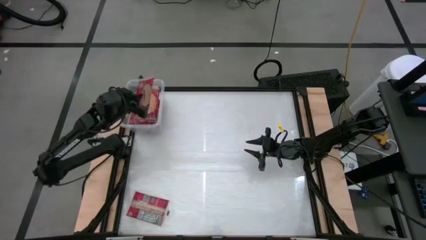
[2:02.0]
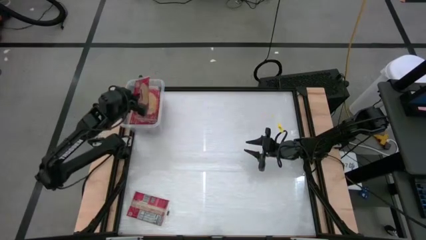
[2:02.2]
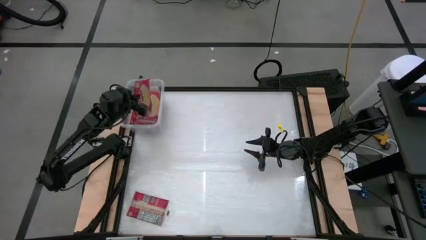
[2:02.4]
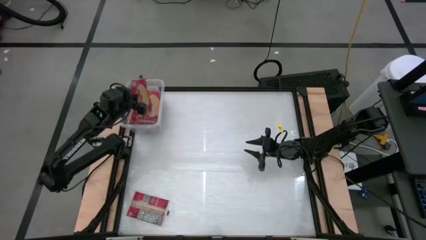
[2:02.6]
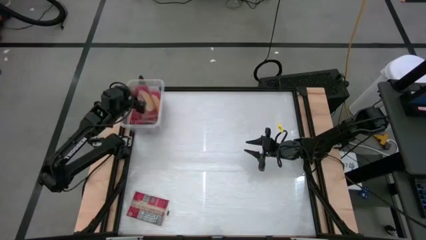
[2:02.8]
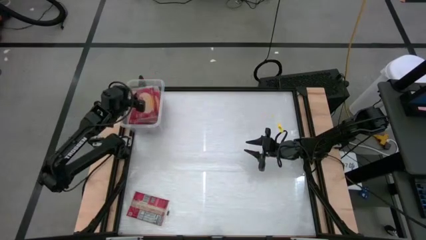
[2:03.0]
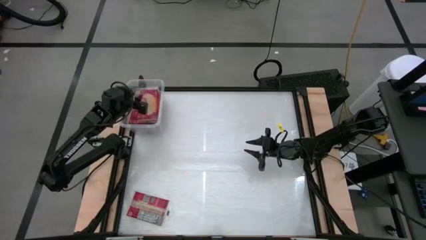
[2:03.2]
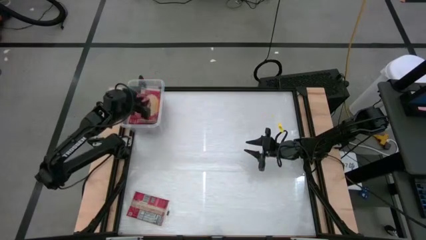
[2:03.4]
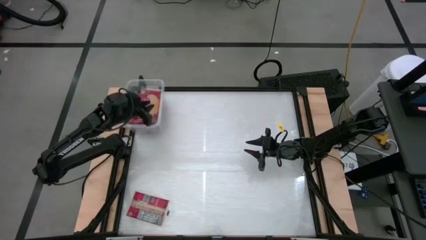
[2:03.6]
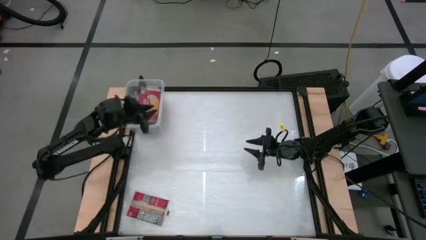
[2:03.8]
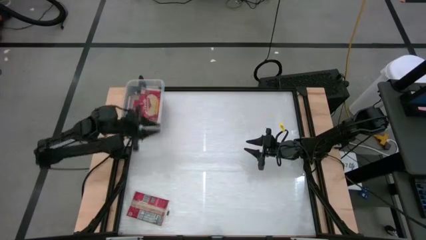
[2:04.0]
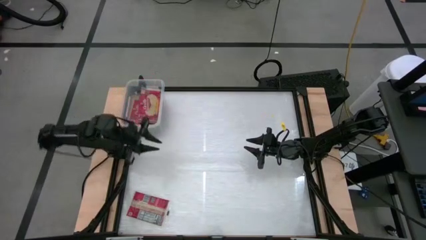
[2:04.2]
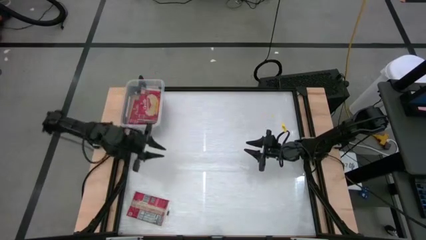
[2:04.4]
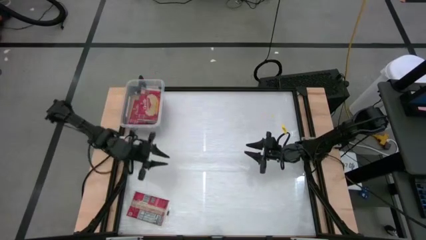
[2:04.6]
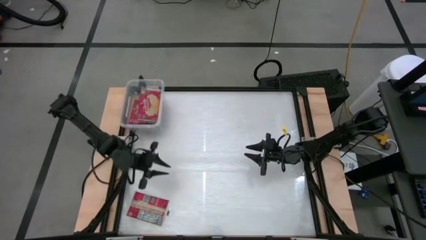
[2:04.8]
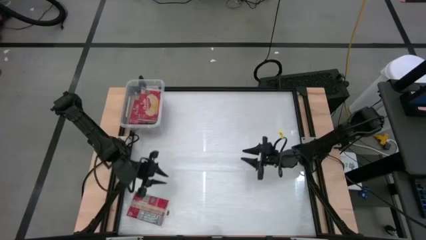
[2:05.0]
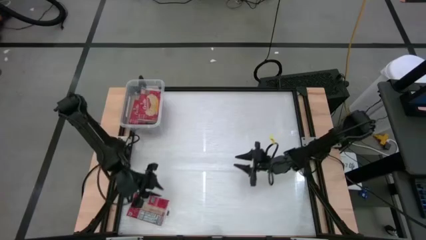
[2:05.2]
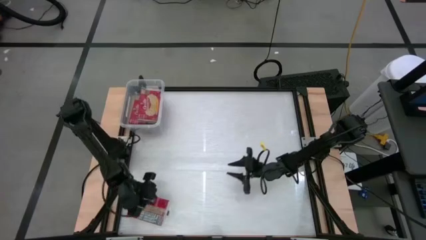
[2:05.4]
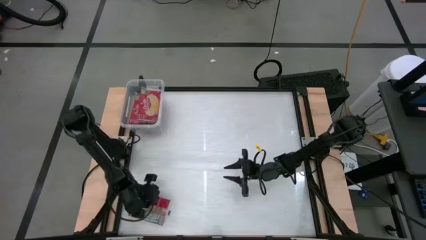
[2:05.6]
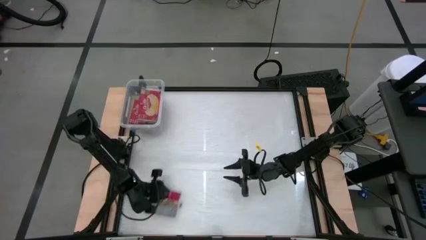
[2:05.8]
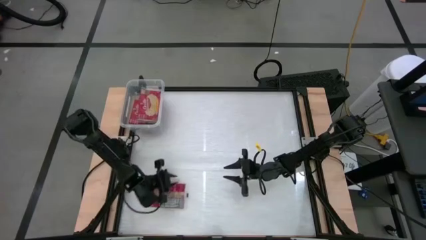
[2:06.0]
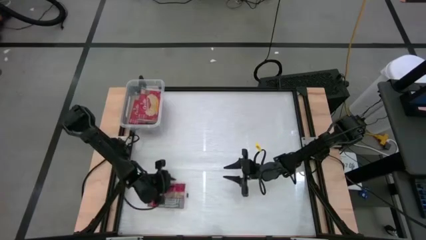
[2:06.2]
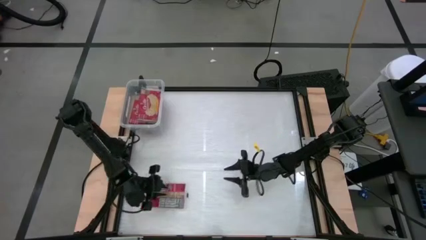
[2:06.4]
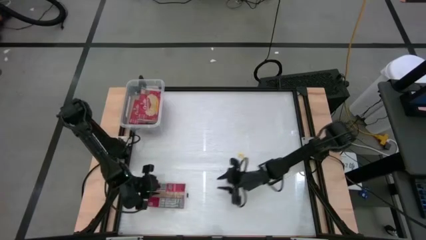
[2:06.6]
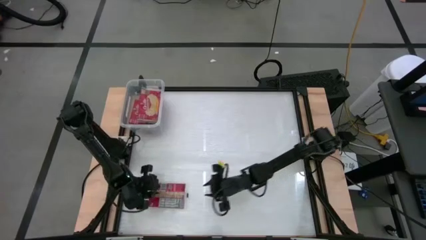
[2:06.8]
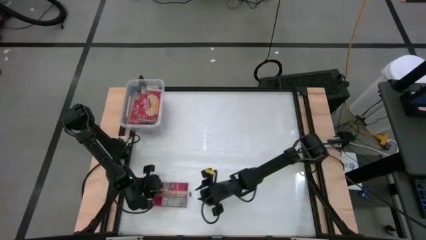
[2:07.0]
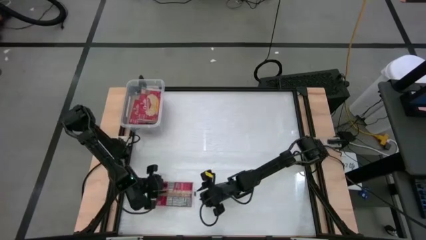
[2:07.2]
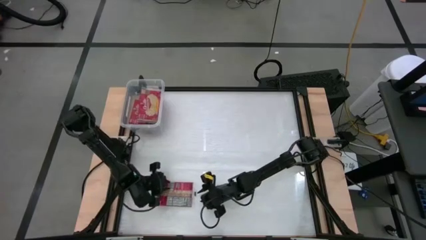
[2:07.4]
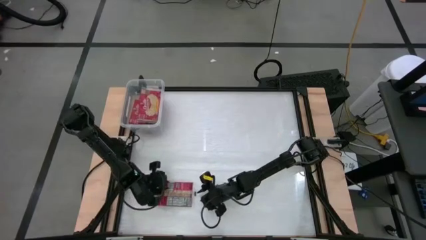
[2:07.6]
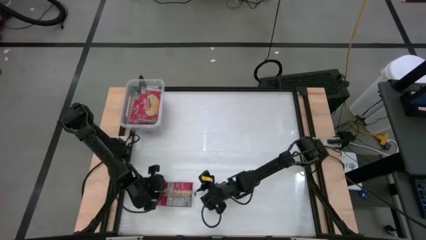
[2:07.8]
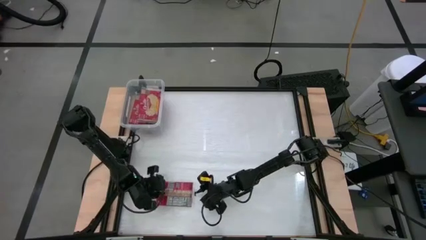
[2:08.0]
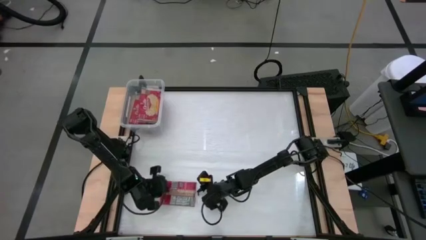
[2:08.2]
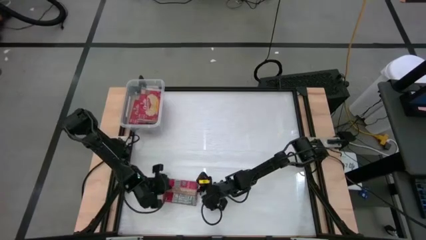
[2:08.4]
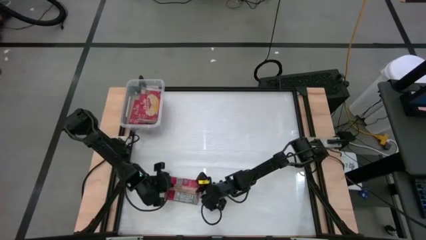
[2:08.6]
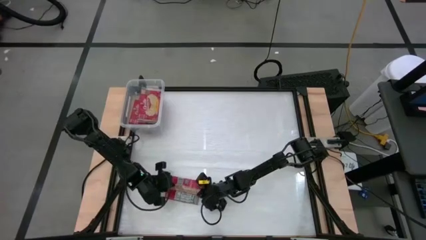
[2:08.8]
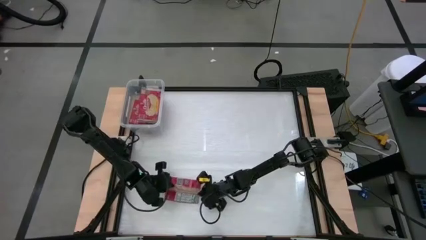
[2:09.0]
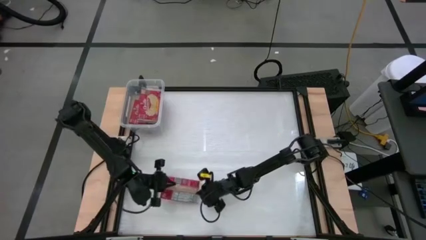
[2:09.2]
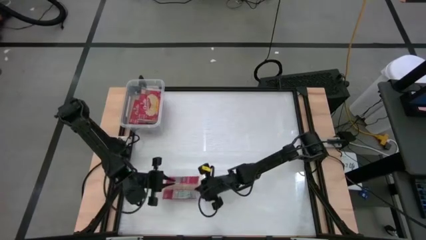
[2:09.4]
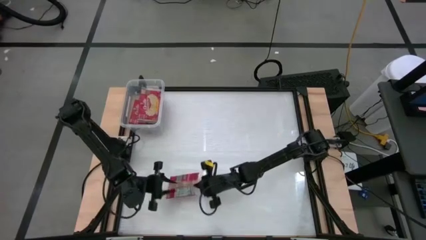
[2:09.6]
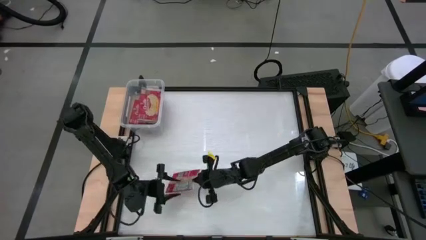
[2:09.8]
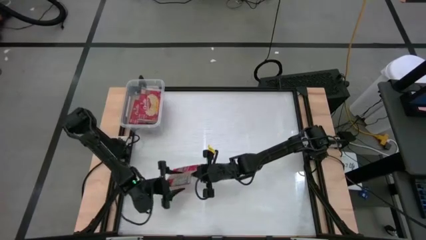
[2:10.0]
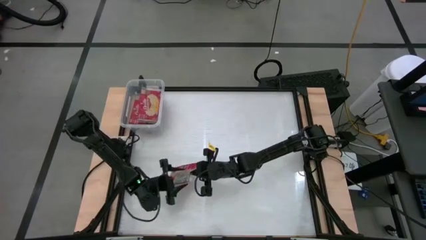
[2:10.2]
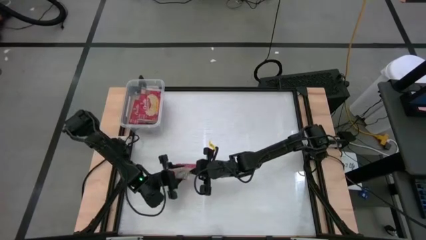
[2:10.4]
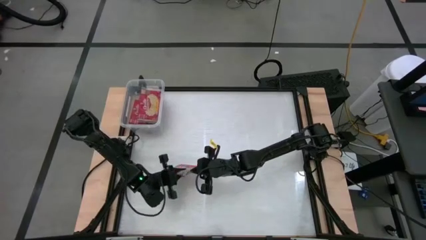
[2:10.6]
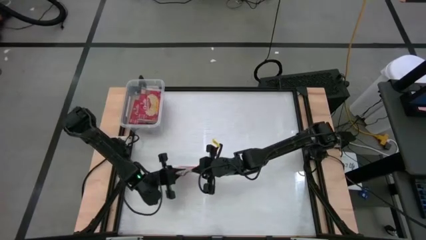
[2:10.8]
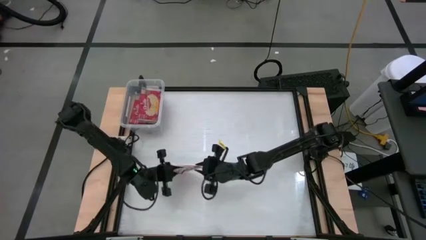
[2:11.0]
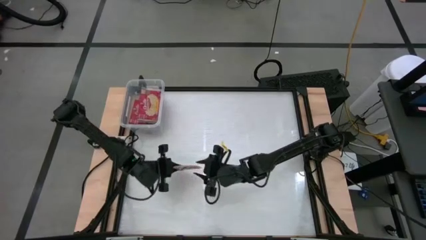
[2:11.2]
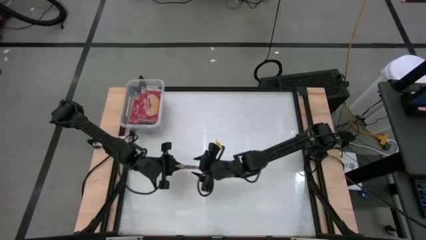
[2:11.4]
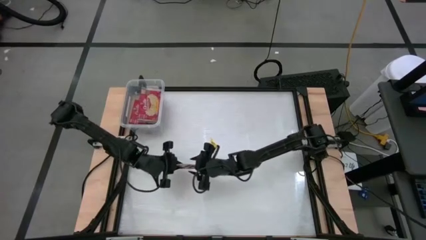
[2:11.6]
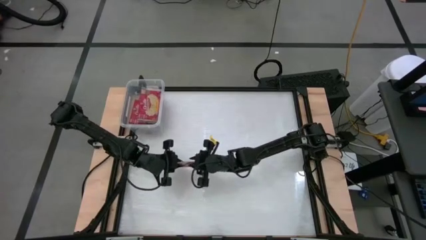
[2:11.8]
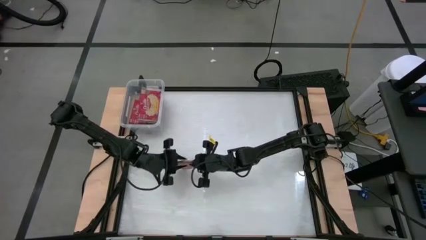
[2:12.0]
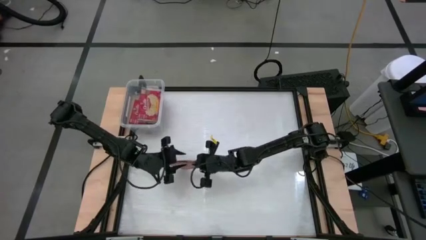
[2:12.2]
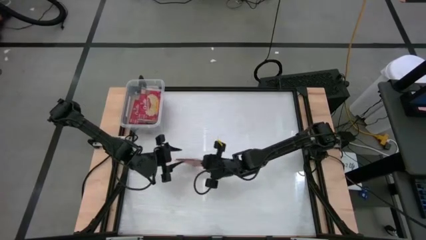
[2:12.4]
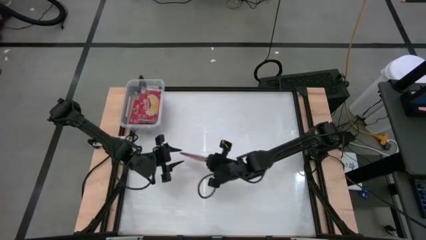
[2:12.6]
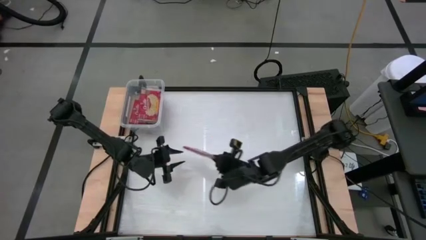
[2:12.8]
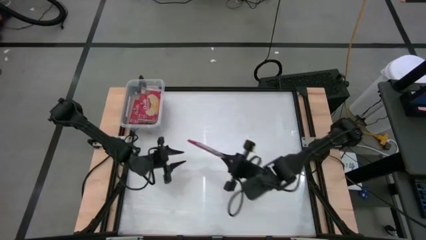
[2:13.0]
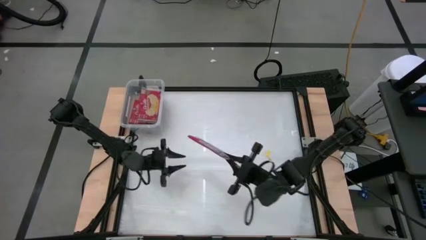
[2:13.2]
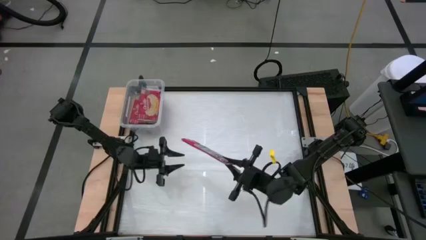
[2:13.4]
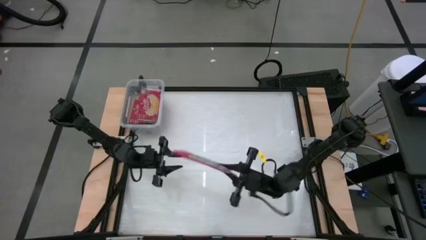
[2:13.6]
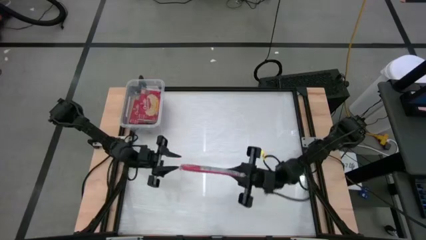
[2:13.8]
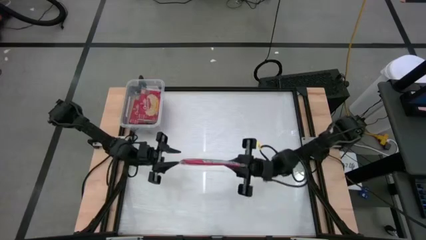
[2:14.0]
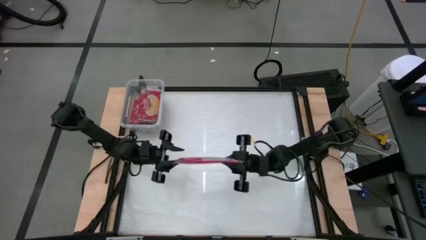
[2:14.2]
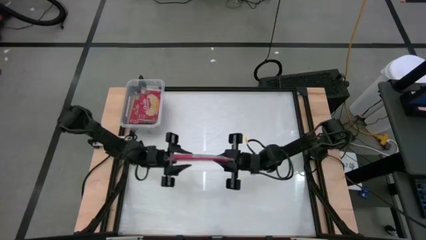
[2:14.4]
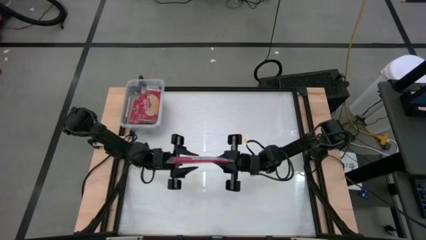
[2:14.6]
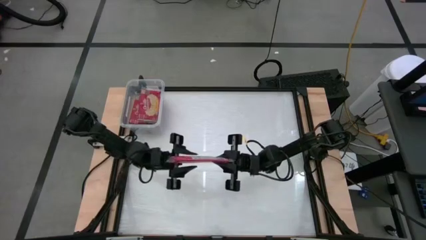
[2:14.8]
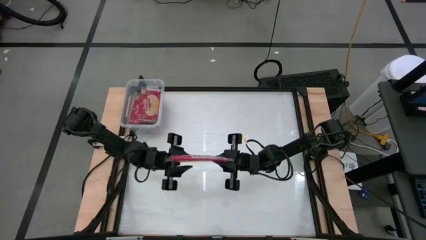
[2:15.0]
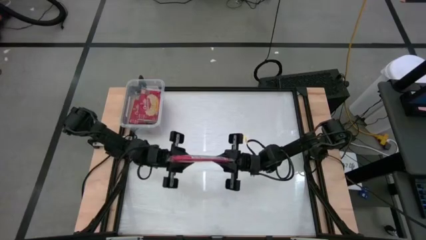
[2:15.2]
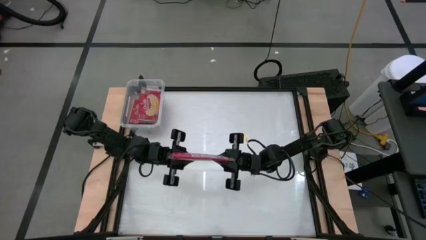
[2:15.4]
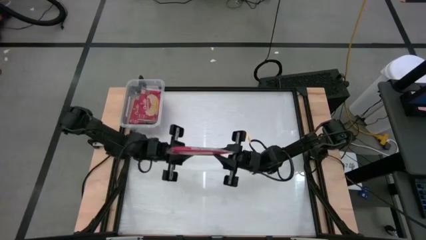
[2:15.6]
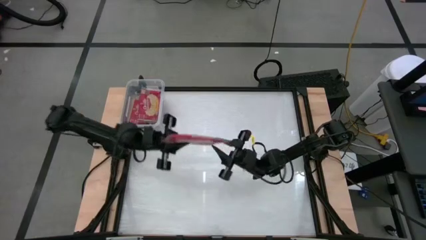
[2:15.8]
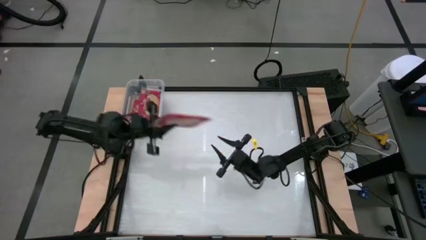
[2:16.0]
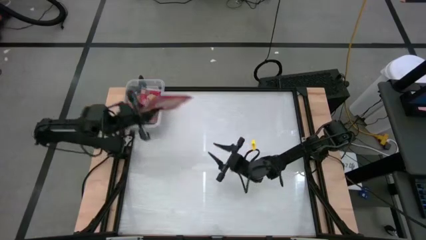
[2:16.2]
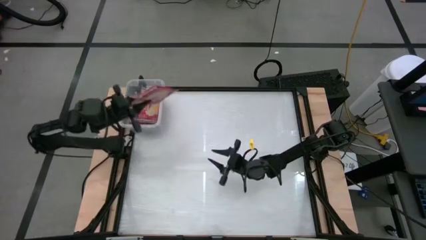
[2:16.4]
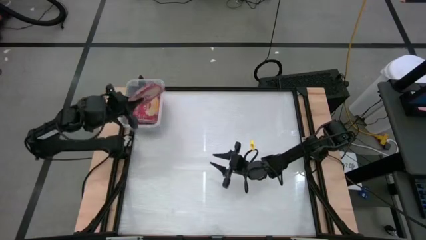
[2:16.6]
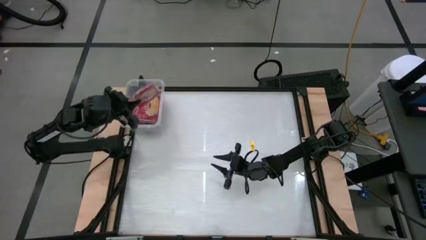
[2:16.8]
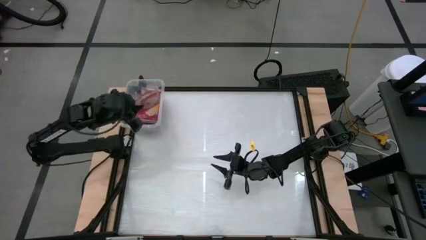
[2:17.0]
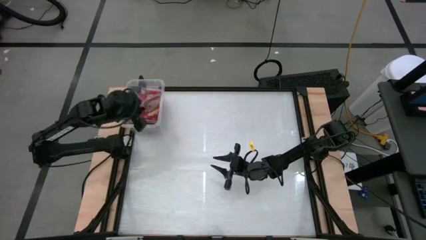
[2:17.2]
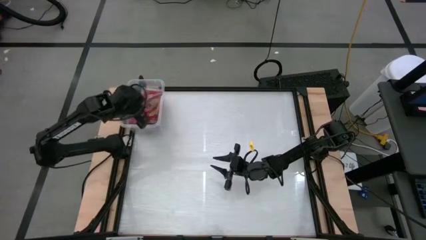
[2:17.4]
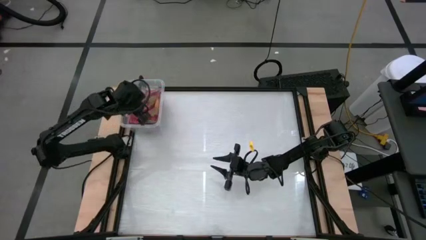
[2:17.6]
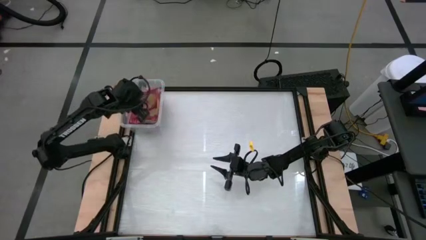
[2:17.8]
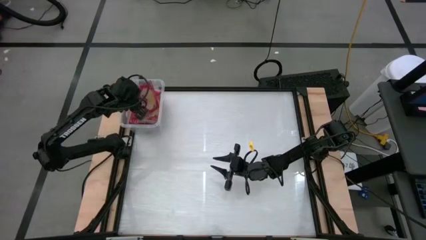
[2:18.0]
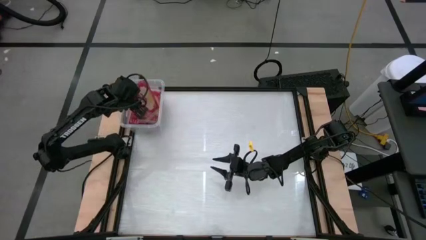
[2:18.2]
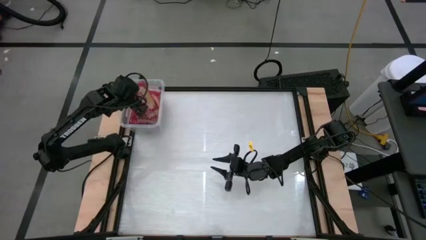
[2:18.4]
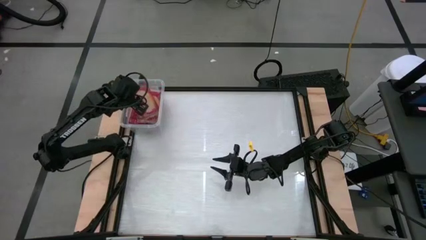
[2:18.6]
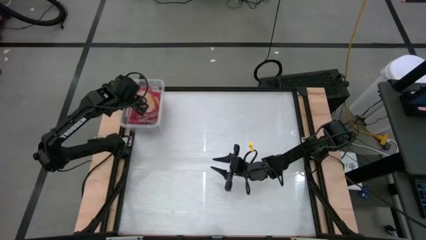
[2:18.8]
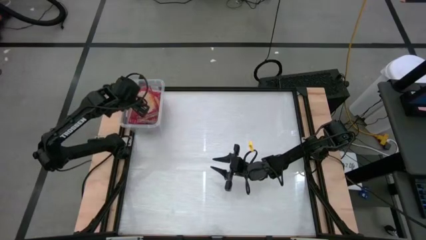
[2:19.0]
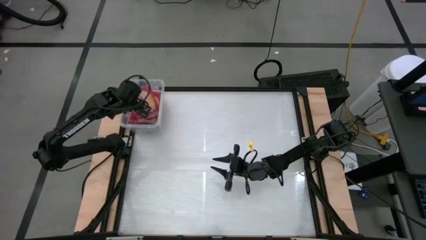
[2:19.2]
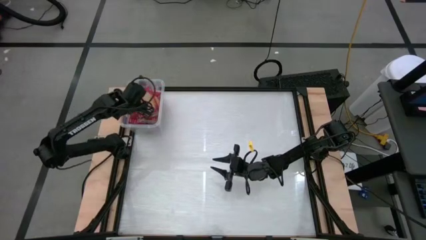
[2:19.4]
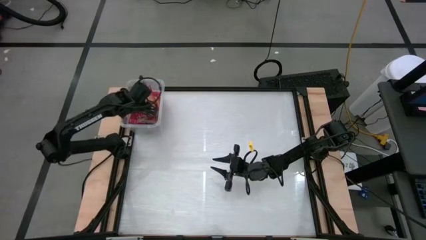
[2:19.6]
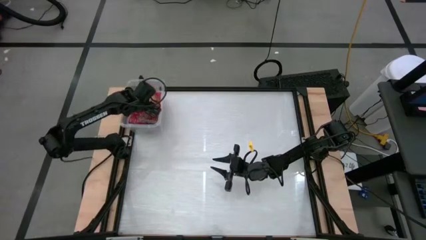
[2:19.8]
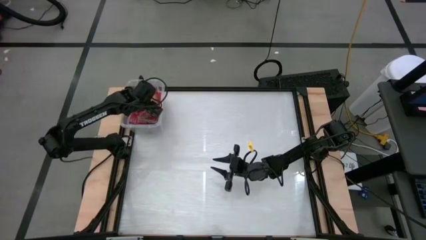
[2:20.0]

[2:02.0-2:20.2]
Task: Sort popcorn bags into baskets
Stack the red popcorn pack into the bin
